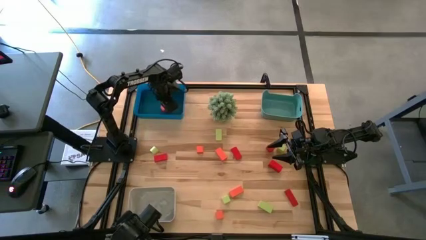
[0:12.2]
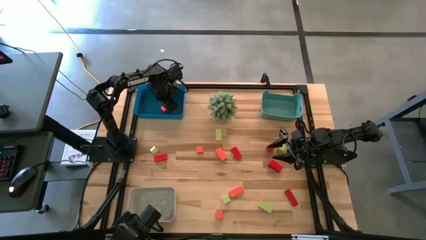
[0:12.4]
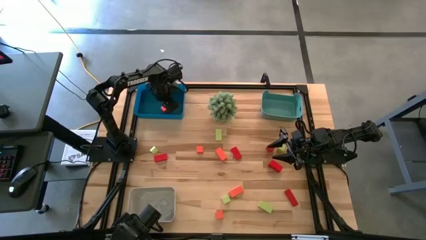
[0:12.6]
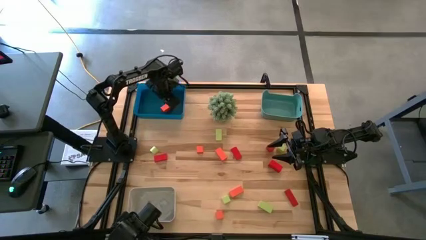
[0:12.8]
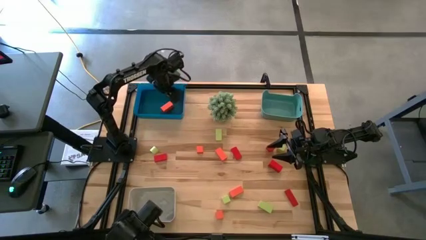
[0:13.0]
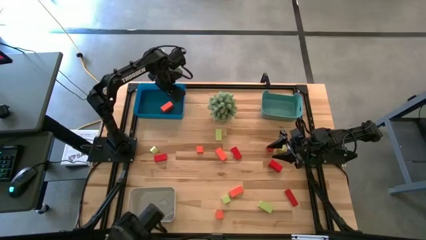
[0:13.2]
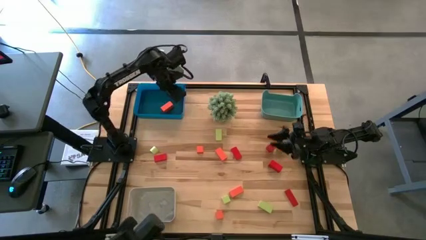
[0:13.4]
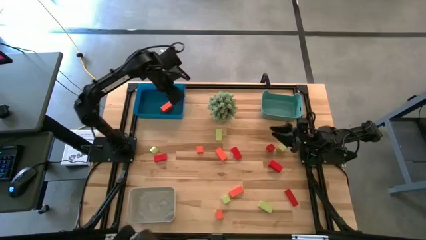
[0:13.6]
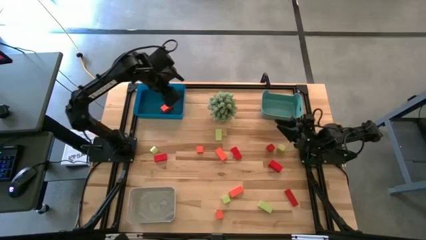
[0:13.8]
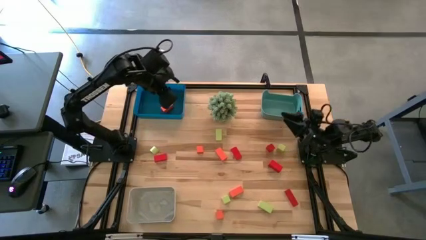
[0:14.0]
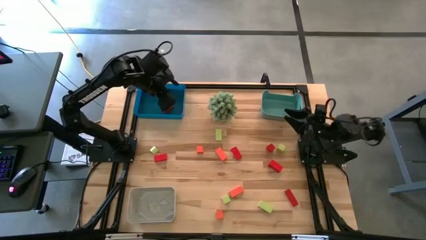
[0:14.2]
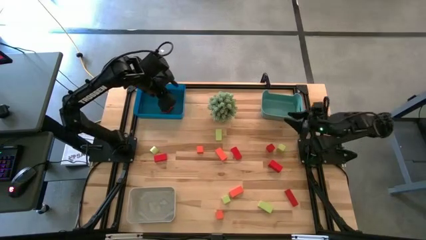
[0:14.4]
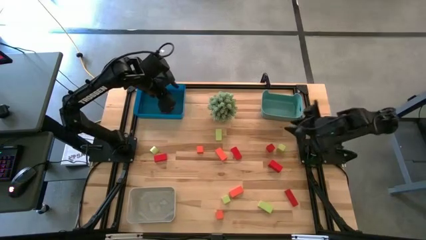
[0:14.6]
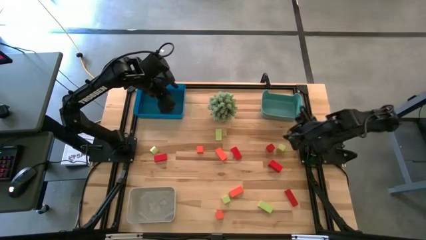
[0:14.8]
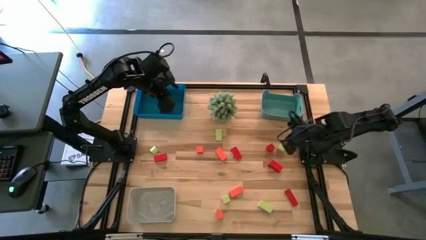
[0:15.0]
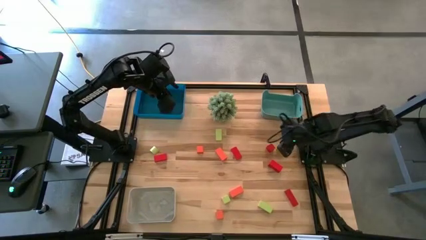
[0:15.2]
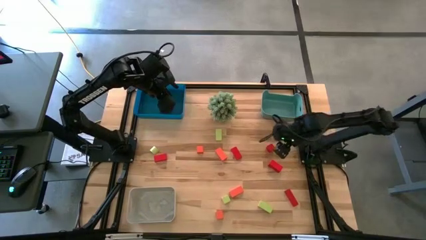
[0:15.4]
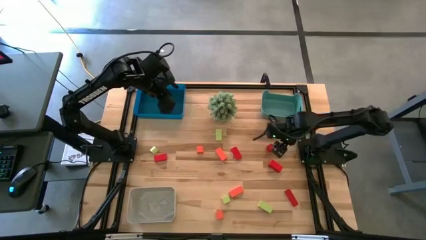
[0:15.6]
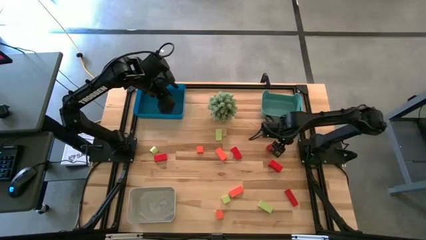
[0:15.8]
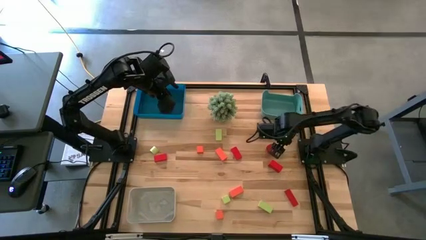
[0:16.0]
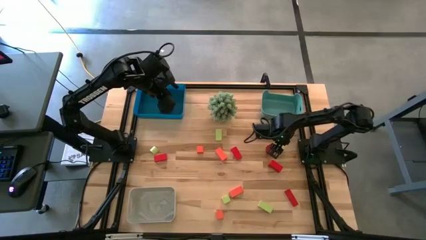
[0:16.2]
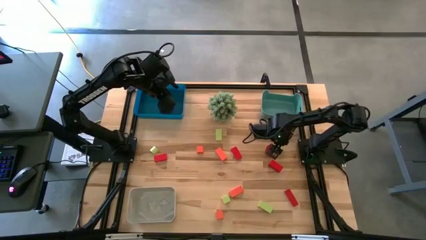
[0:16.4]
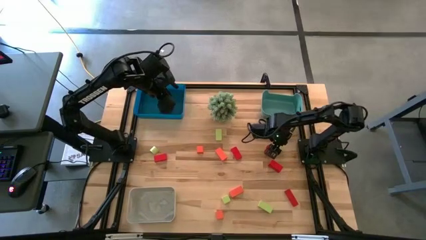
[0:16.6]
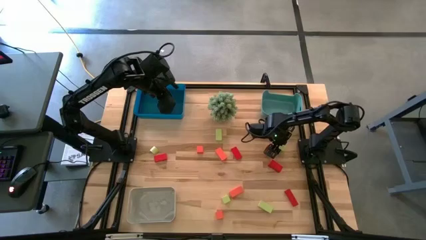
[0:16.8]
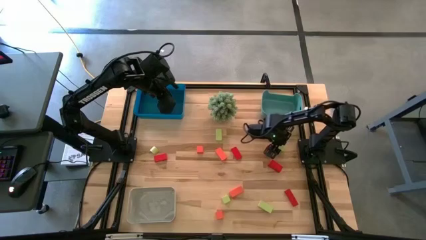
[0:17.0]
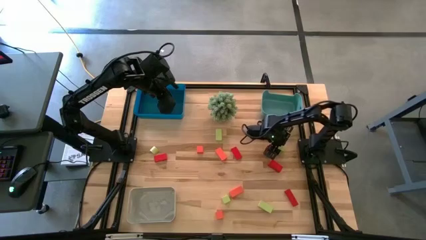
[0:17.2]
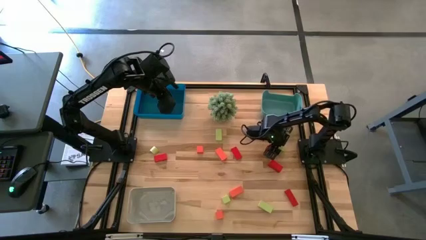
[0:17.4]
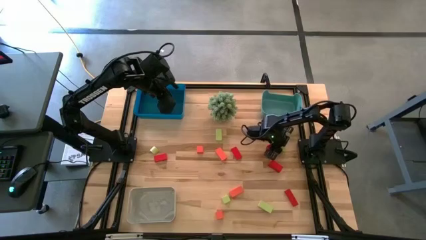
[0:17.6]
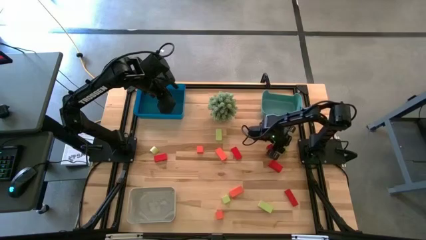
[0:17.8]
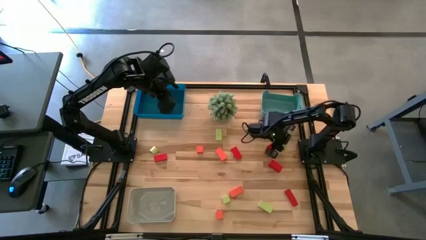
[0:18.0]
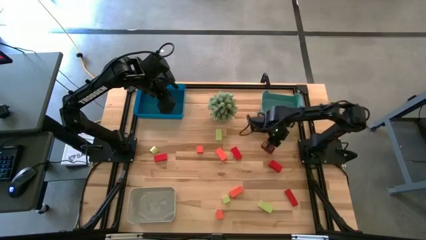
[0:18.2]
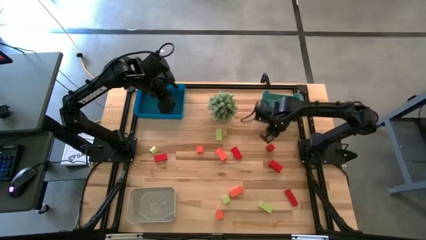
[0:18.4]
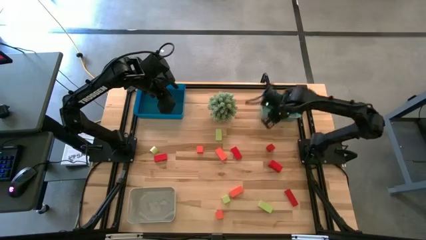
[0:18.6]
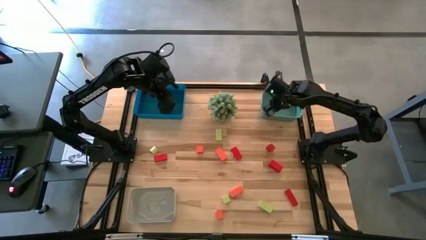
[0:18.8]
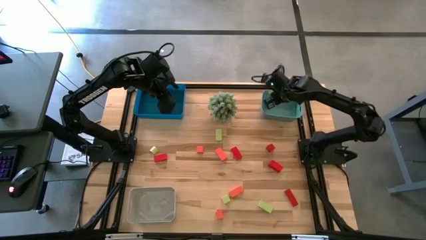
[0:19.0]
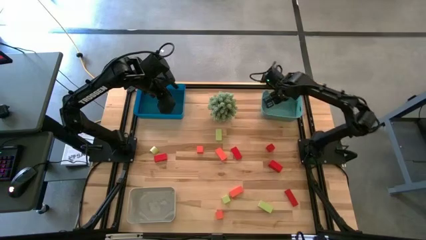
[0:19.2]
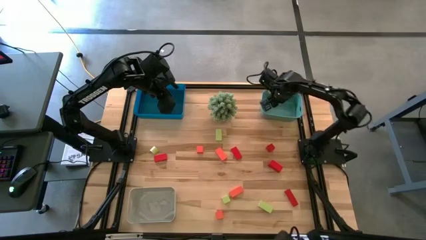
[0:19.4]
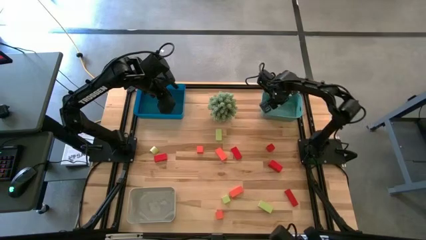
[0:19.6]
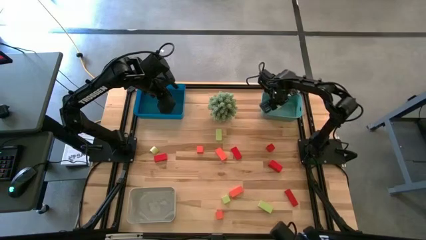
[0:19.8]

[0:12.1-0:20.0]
Task: Sort & place blocks by color
Put the light green block into the green bin

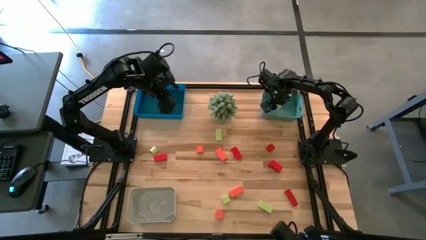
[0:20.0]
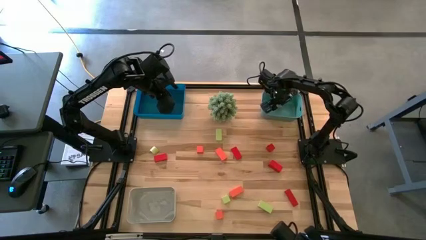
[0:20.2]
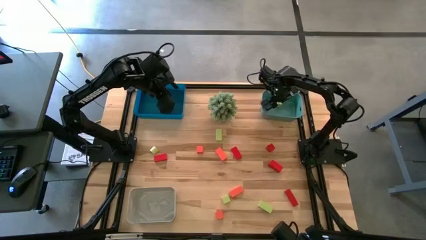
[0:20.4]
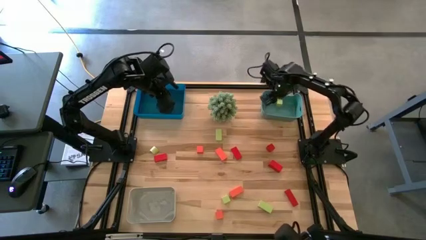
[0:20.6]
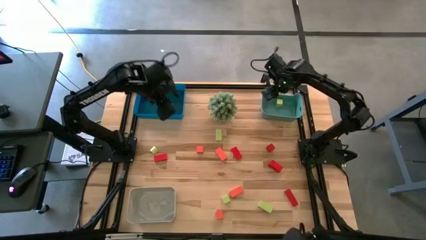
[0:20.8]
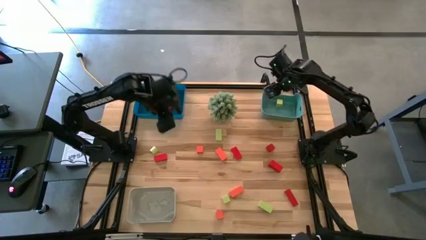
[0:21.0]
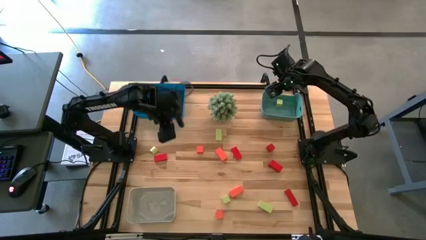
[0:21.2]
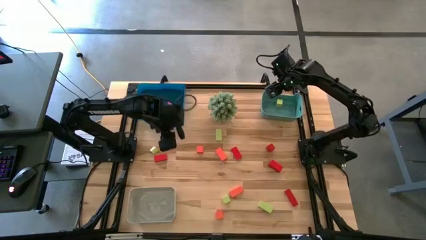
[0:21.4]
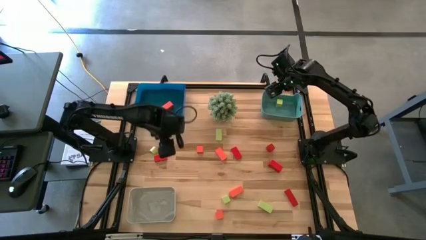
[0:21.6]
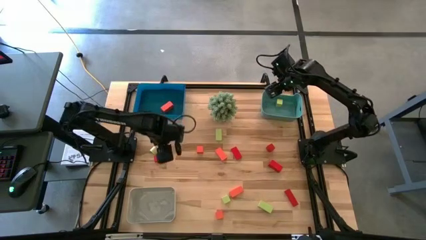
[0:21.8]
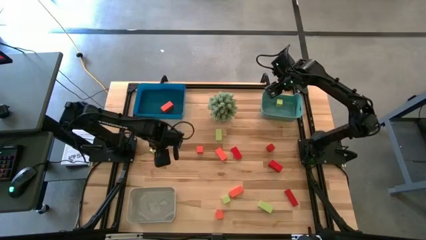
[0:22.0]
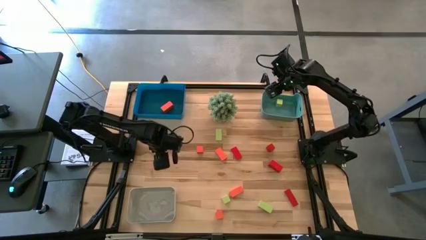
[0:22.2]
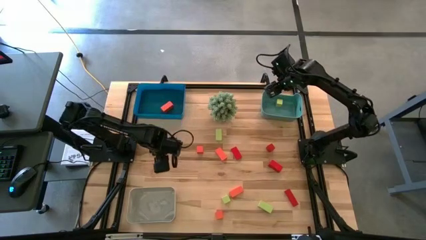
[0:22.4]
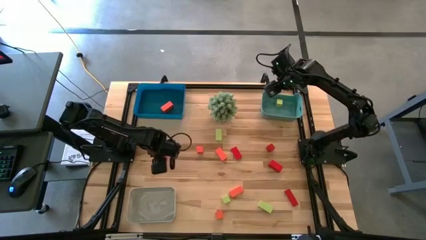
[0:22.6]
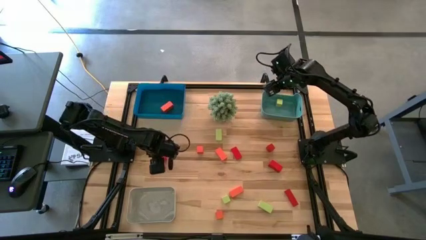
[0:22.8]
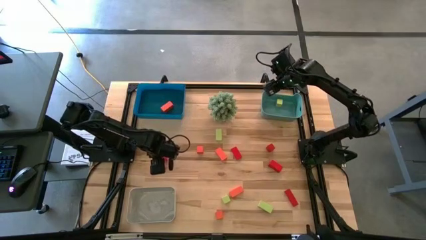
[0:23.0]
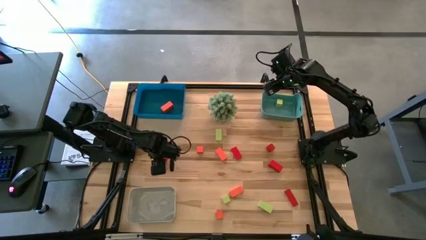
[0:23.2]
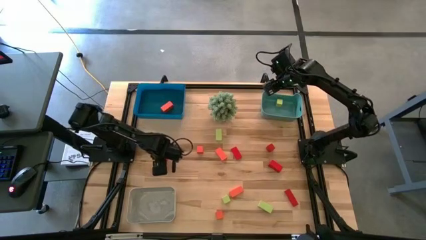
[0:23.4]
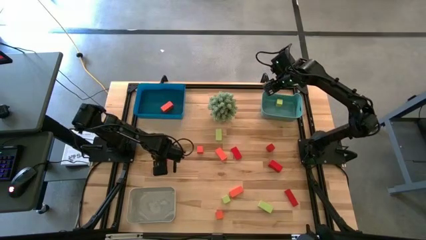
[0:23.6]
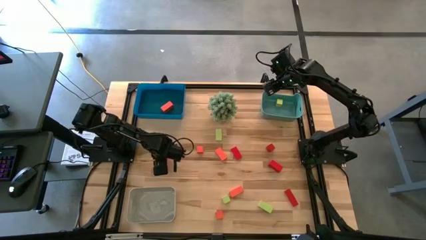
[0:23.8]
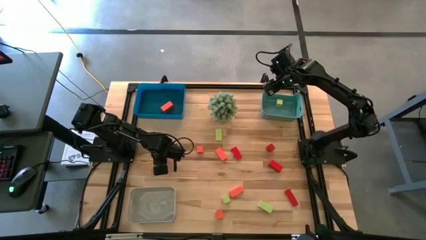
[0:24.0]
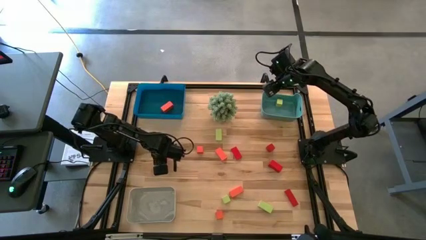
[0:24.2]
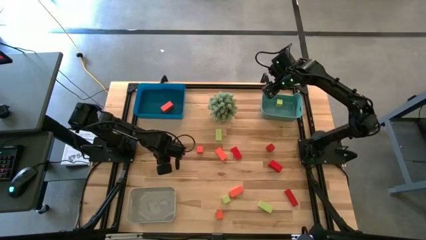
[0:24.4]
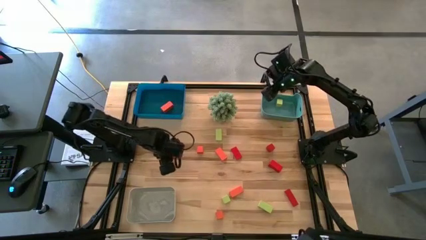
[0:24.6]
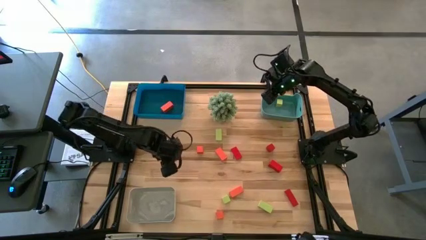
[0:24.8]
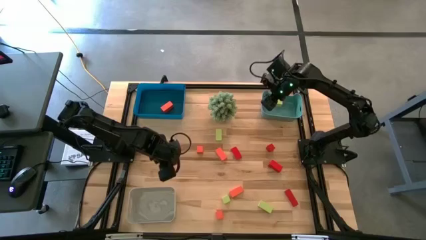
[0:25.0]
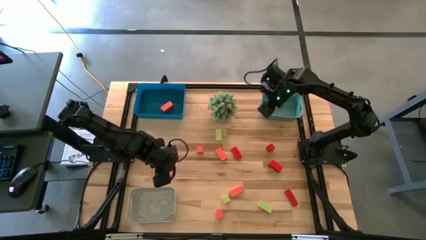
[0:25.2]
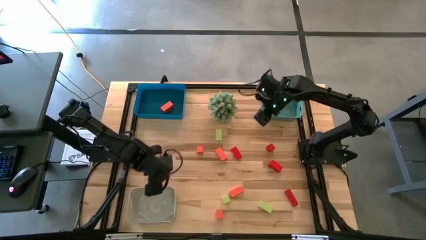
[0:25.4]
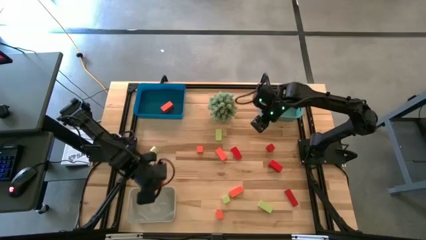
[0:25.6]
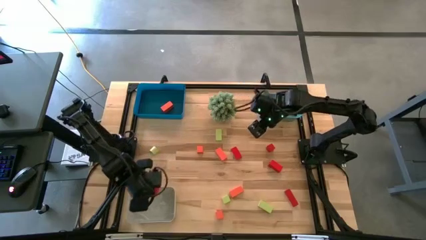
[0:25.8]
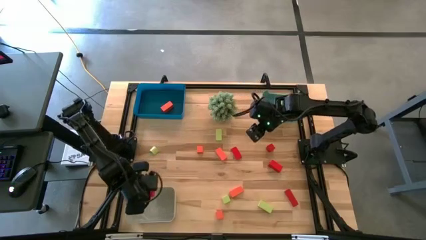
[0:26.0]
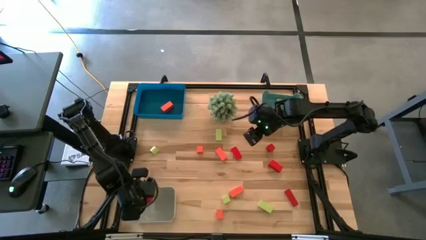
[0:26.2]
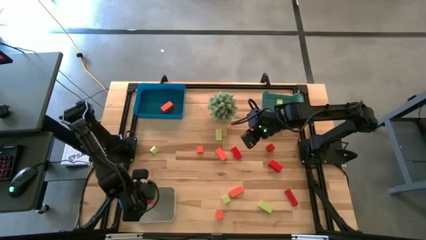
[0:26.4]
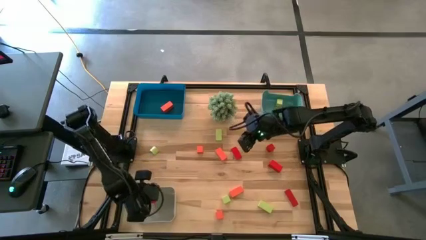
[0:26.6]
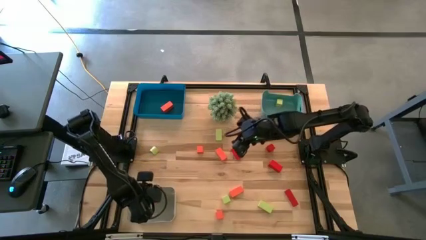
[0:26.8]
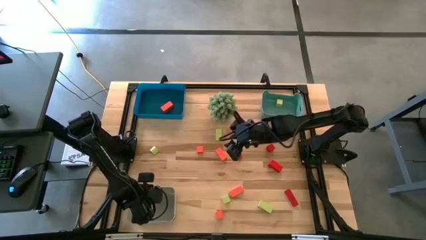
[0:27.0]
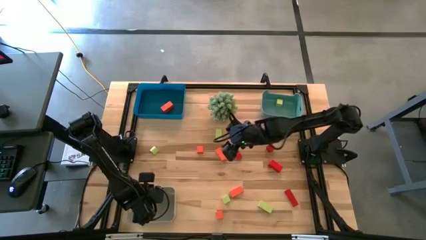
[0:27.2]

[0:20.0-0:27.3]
Put the red block into the white bin
